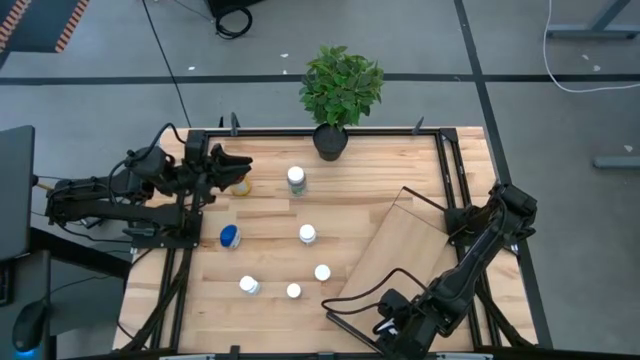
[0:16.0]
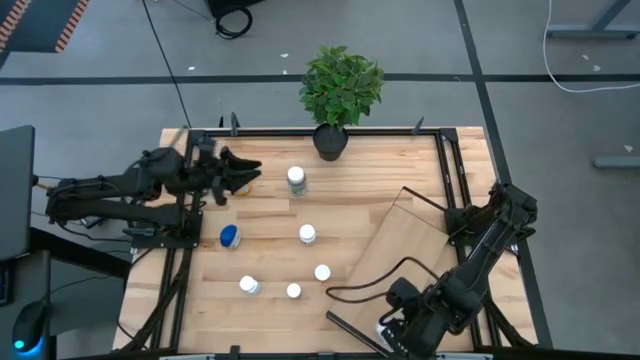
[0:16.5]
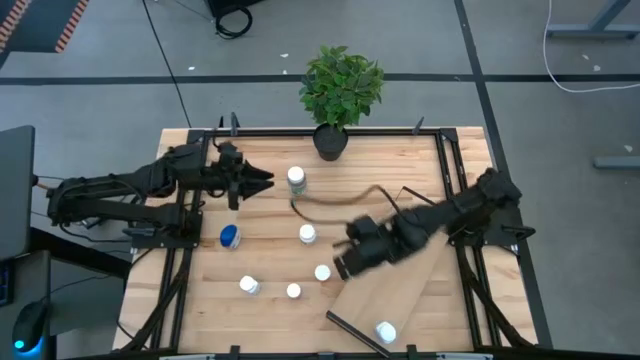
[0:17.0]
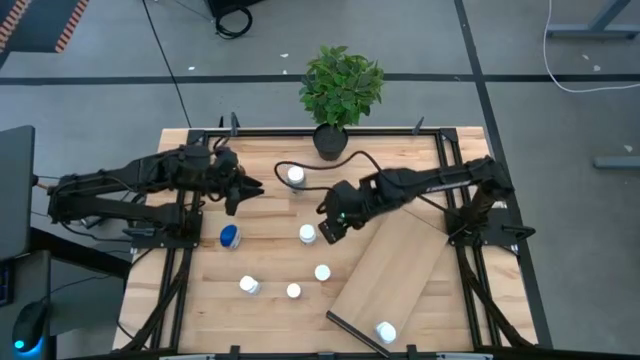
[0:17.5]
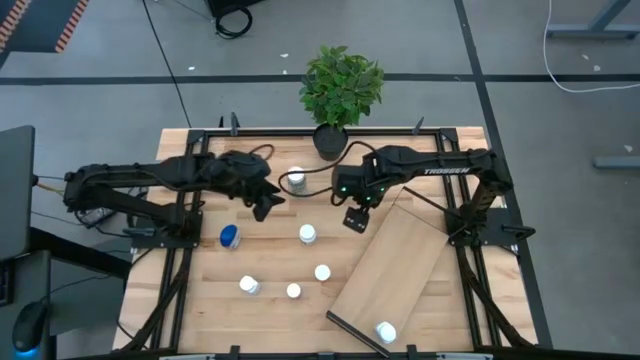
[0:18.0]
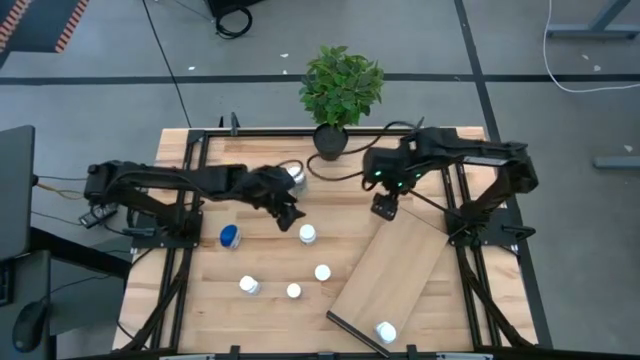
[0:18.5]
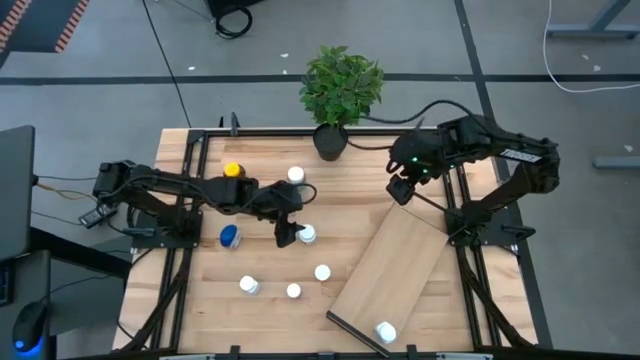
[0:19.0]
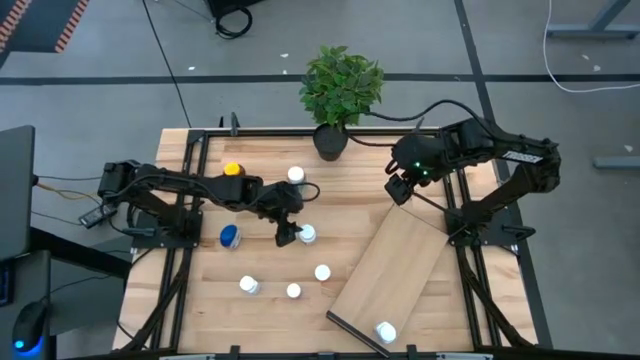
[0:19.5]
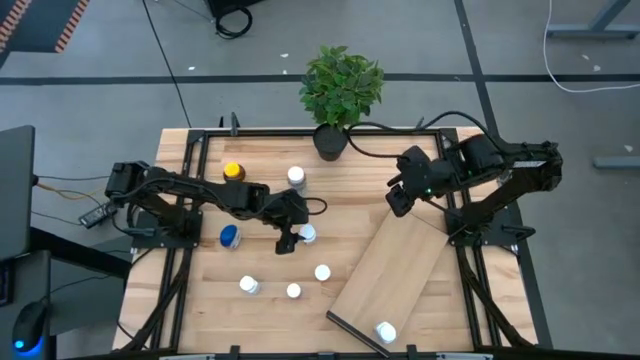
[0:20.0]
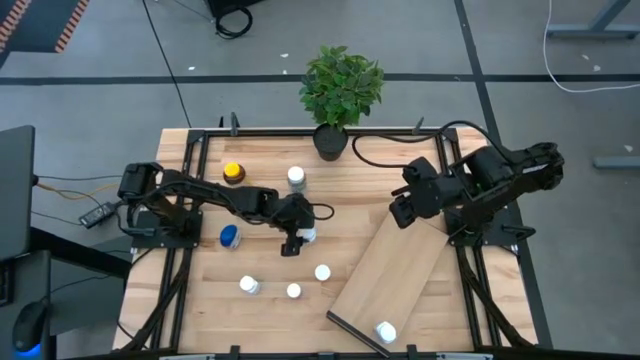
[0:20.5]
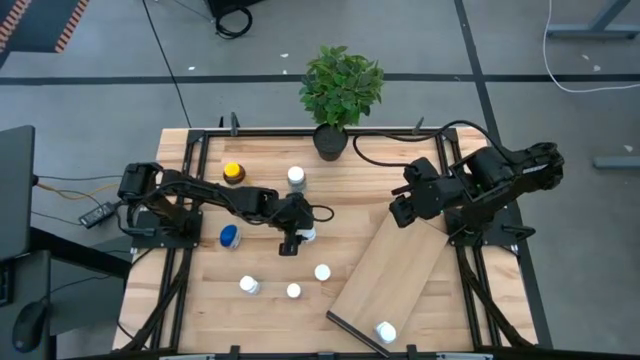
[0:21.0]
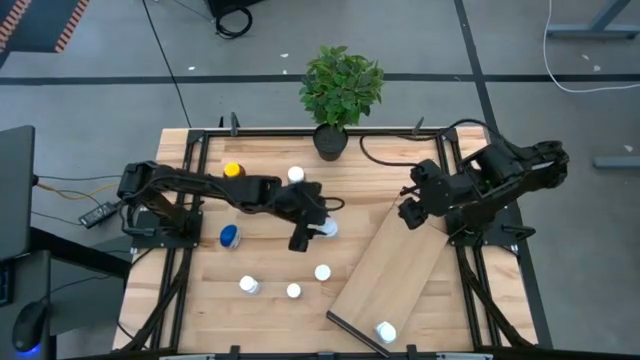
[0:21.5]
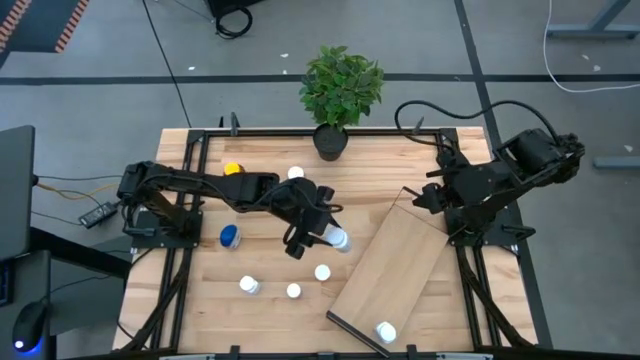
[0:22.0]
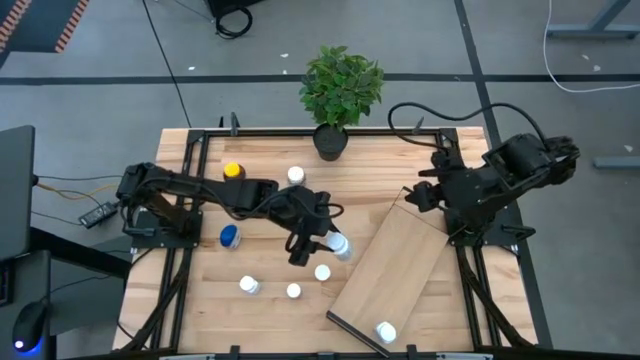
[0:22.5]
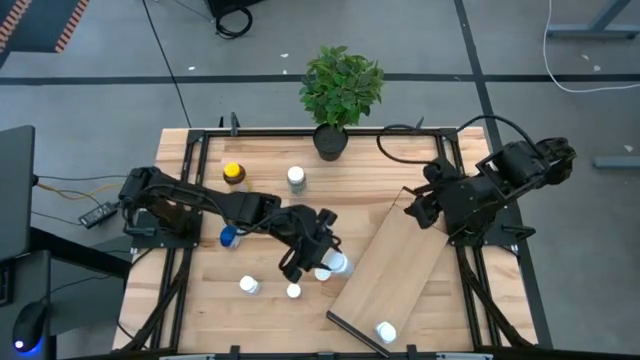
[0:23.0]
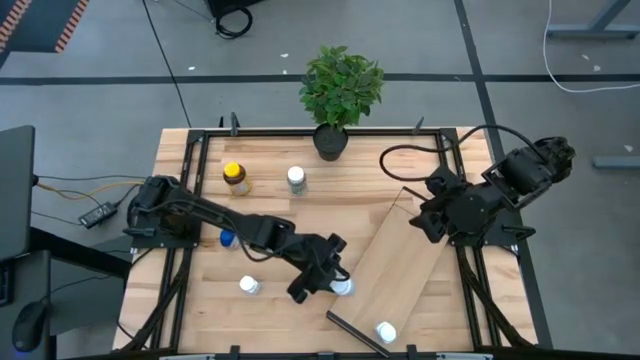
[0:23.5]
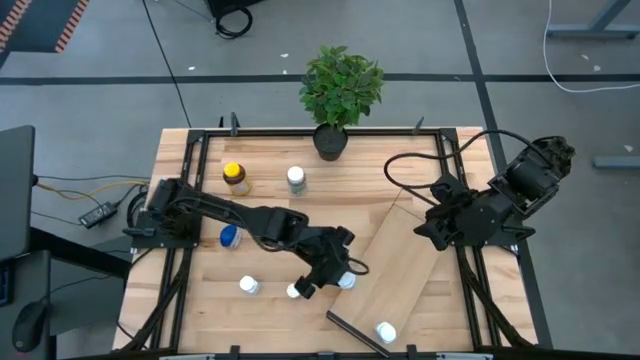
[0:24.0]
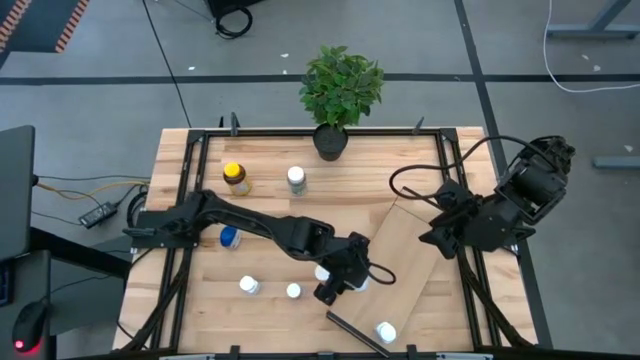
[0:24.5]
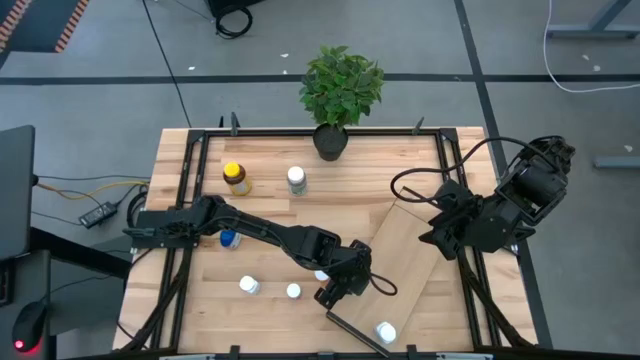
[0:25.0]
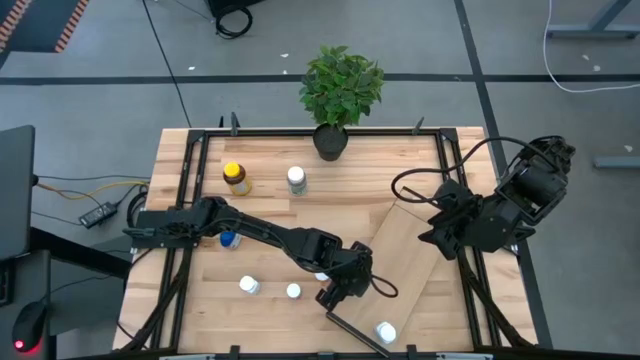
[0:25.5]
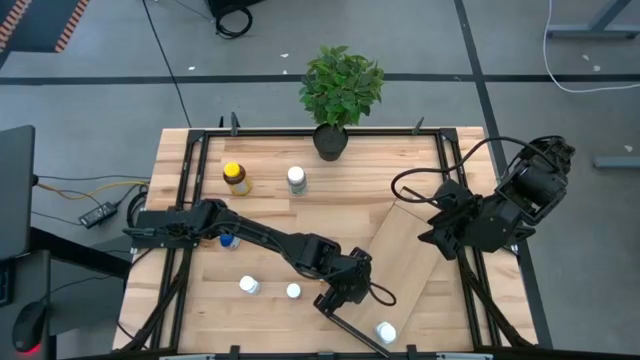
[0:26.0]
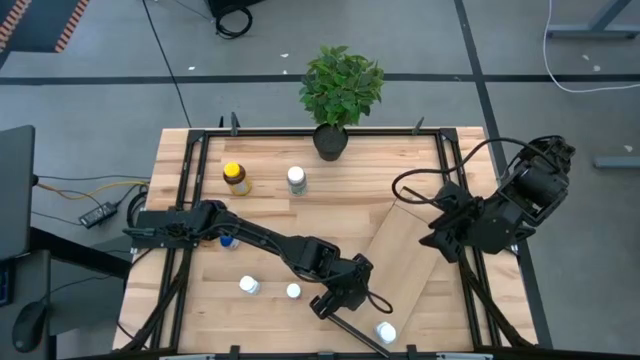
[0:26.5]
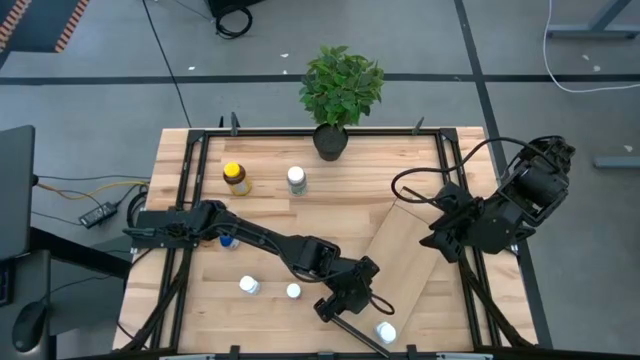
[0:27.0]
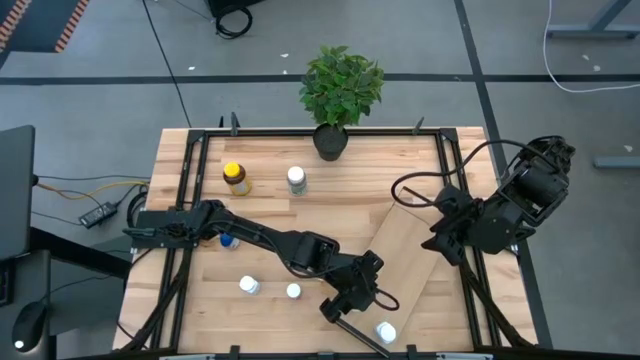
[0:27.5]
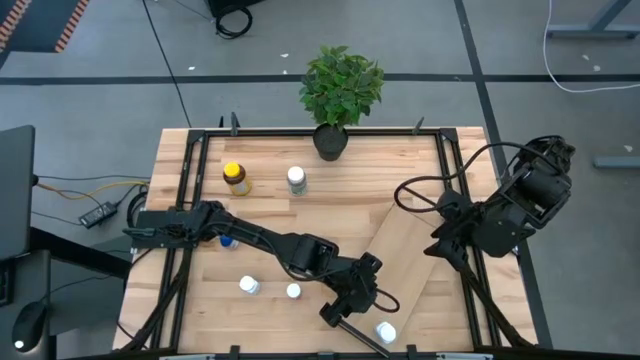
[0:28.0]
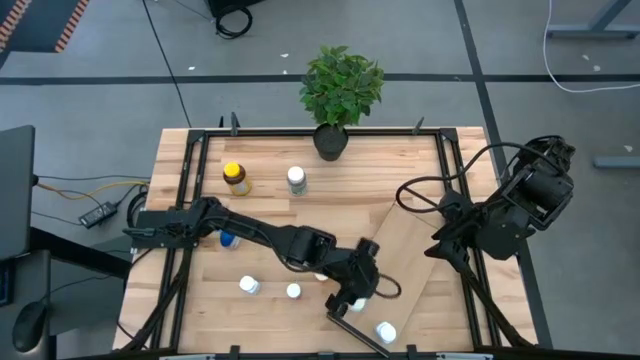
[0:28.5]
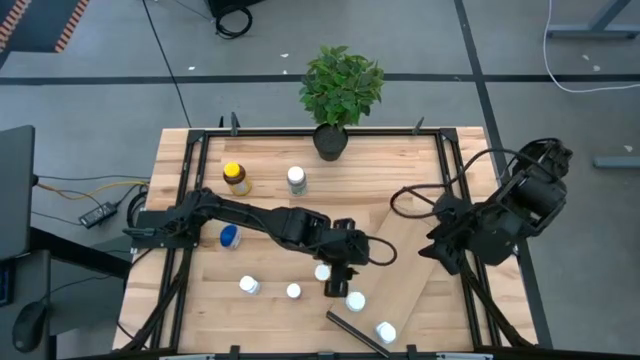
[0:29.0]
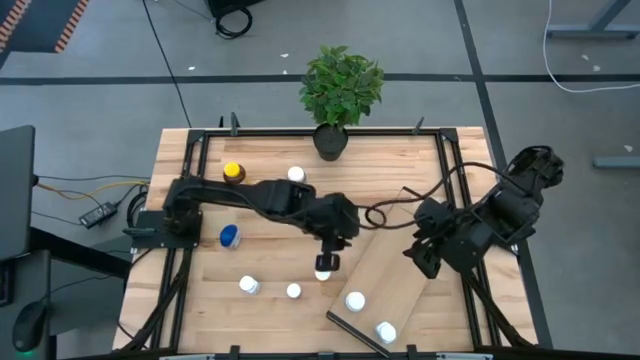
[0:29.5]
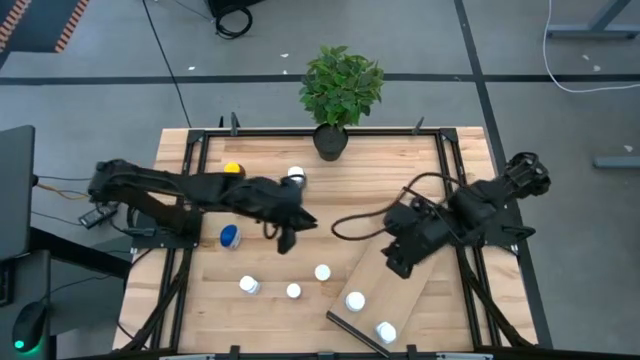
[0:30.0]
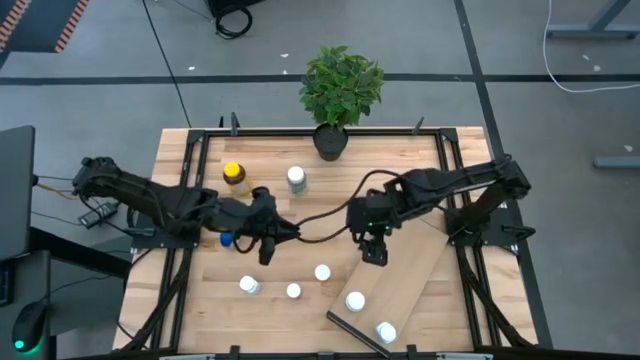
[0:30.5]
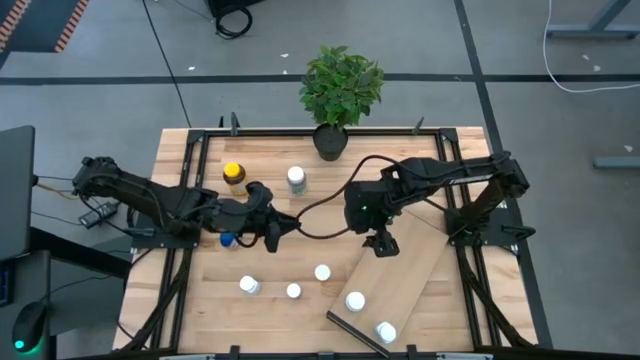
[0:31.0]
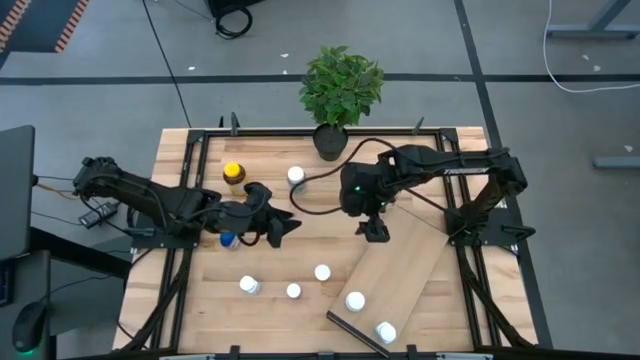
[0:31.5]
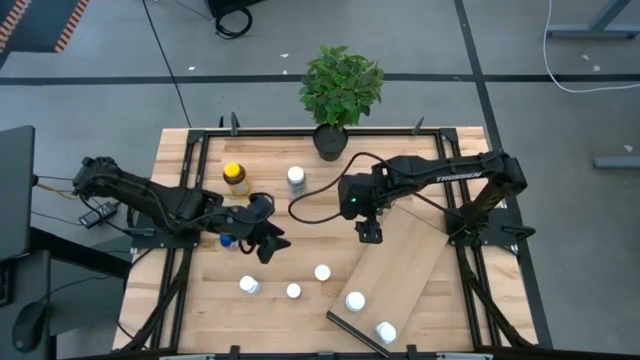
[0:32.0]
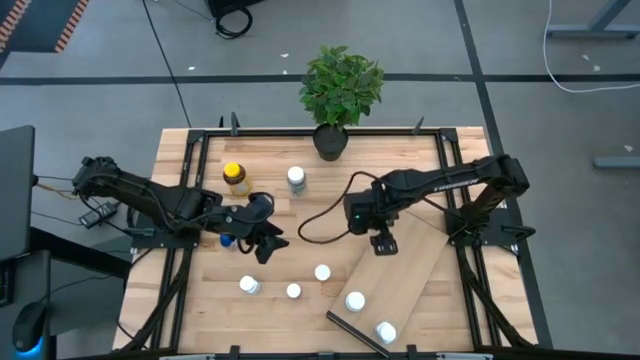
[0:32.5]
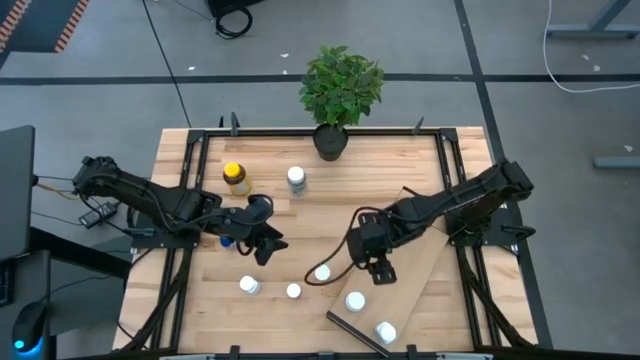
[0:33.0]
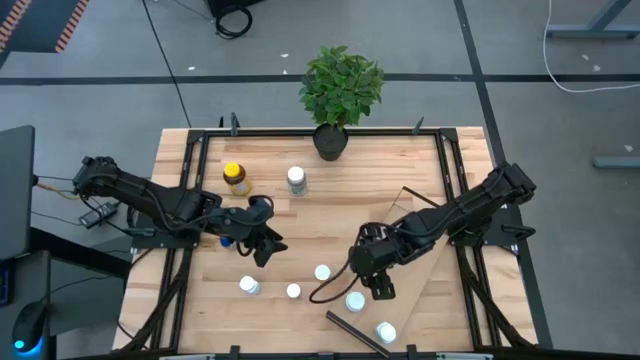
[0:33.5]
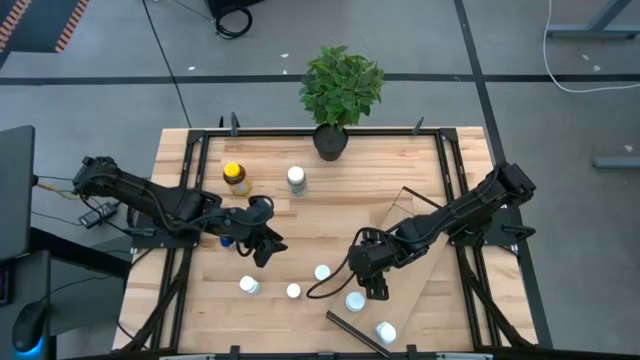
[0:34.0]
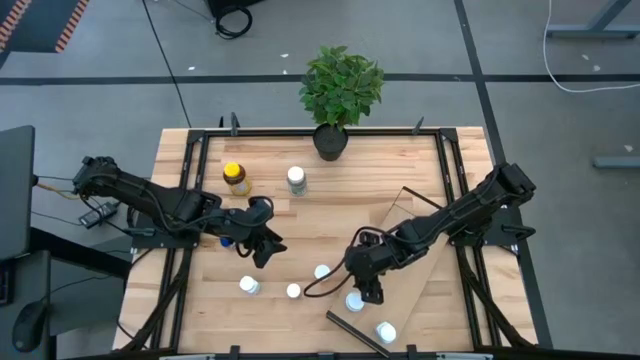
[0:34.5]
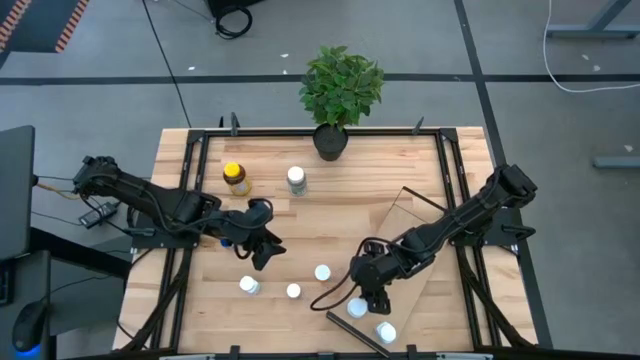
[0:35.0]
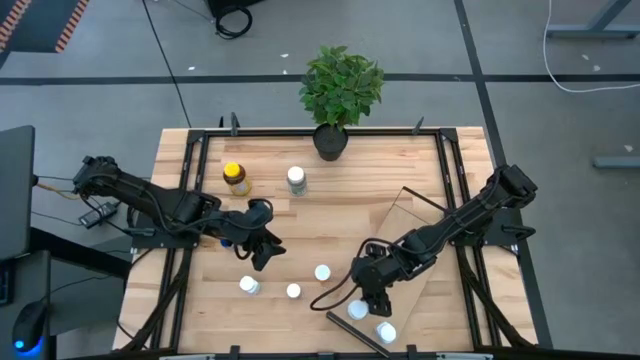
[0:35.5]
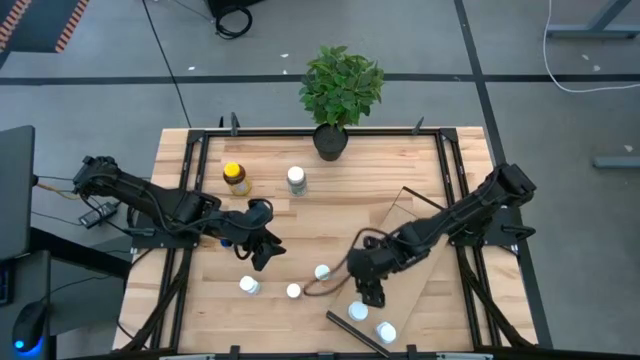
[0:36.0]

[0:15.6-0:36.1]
Task: Pick and place medicine bottles onto shelf by color
Put the right white medicine bottle on the shelf aligned with the other white medicine bottle
